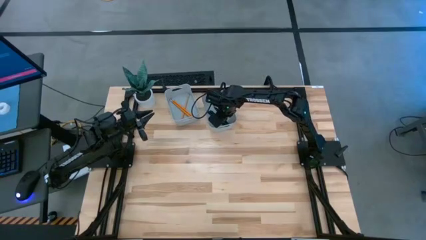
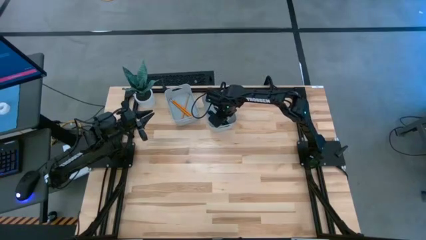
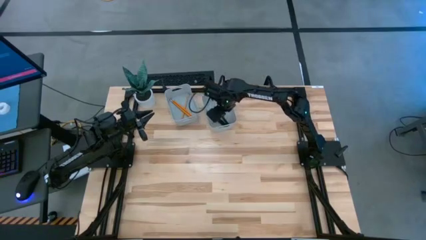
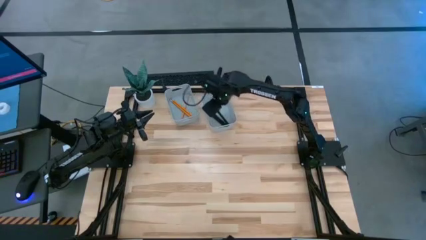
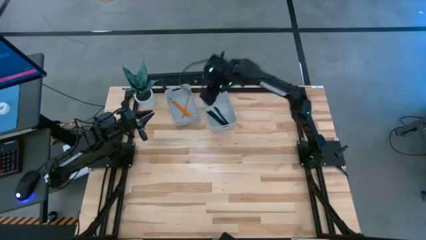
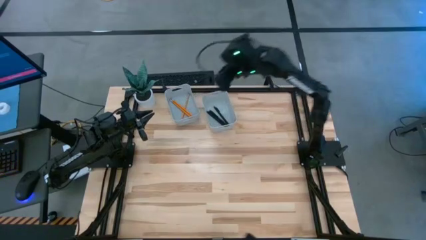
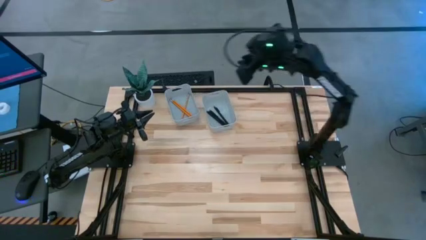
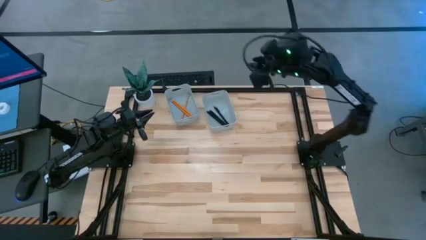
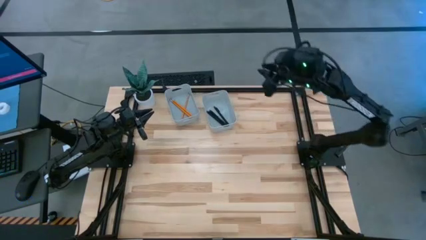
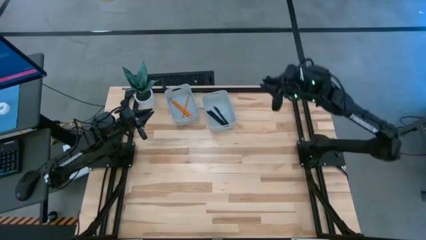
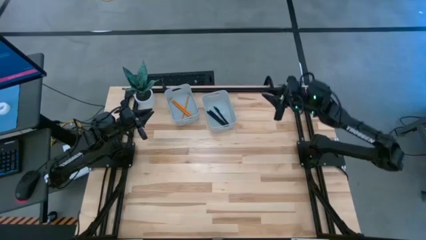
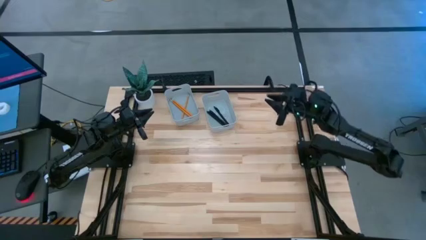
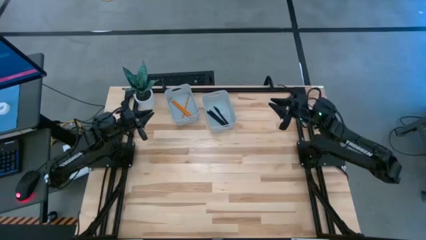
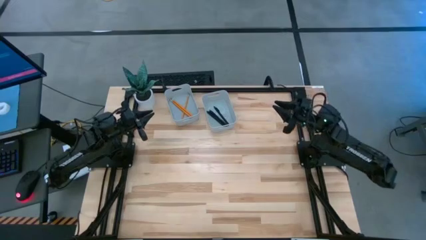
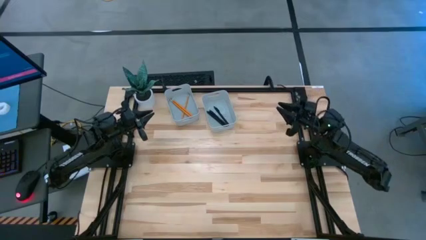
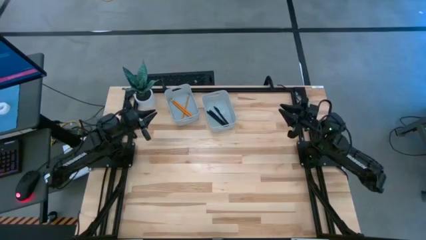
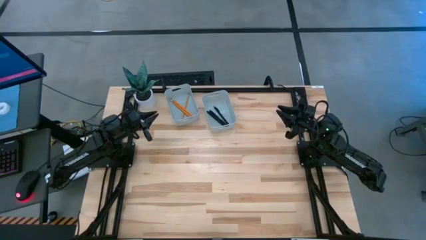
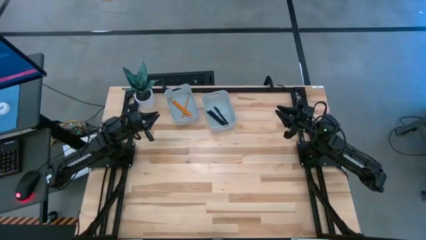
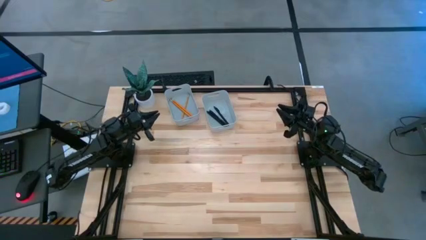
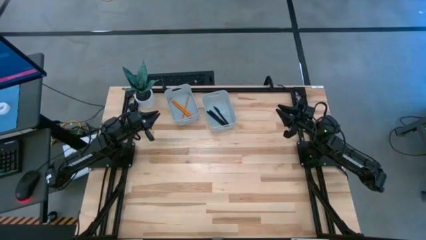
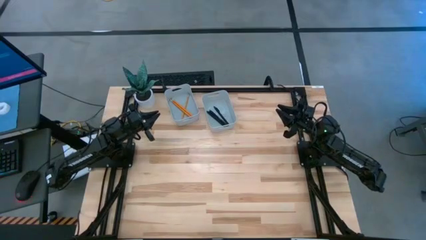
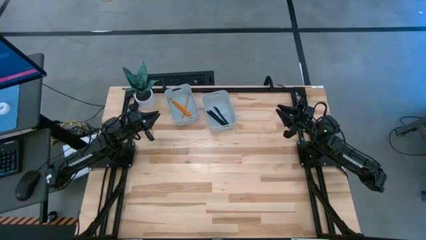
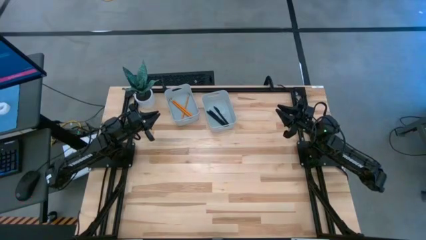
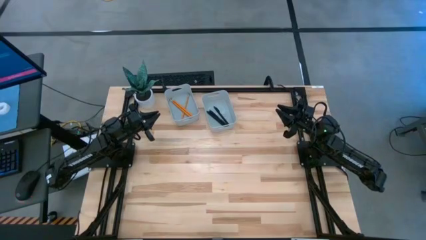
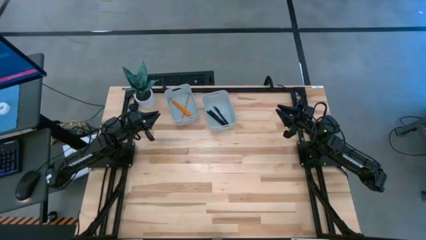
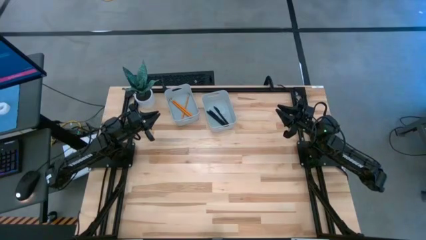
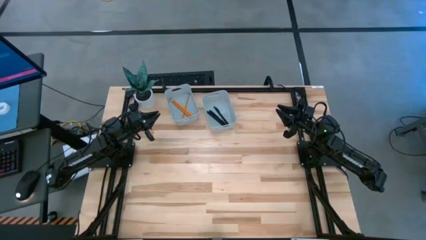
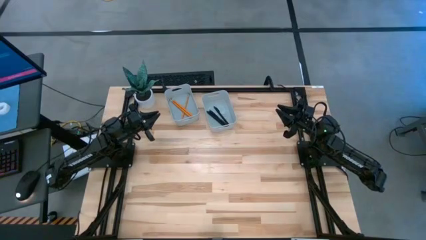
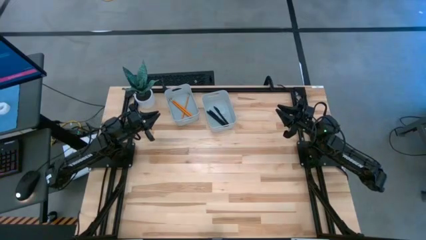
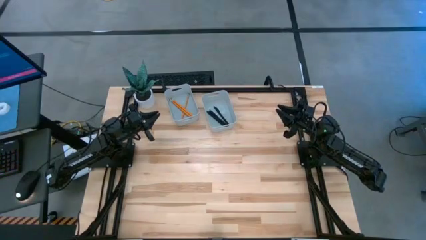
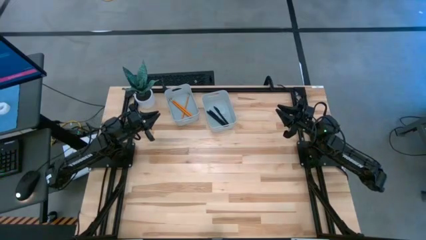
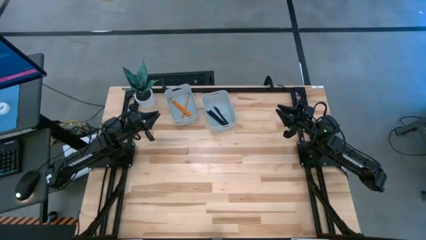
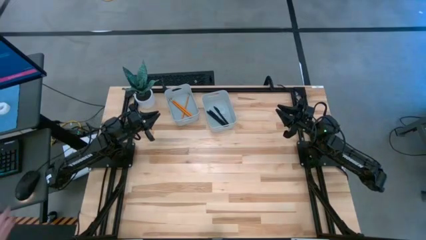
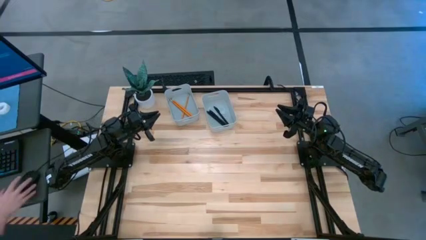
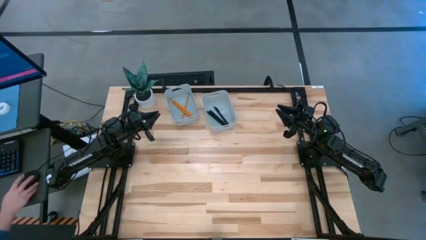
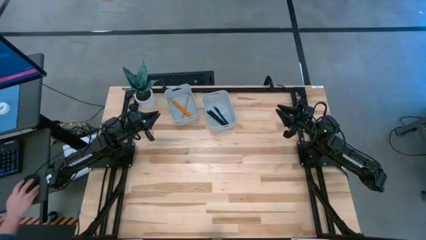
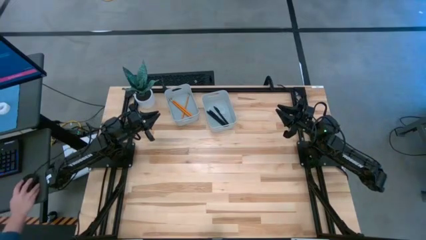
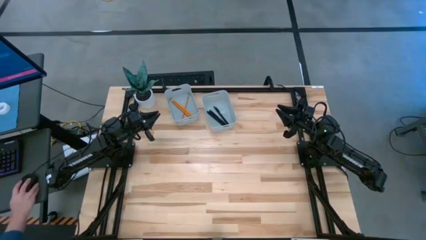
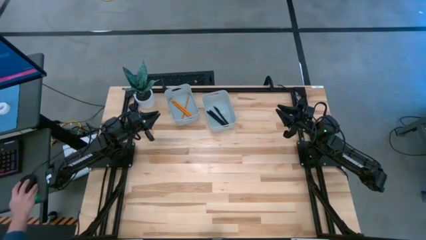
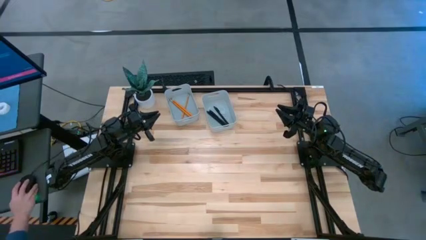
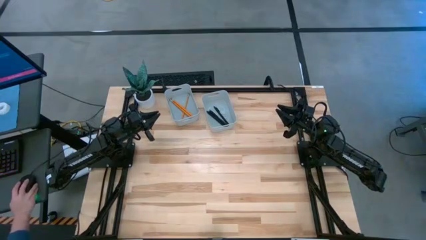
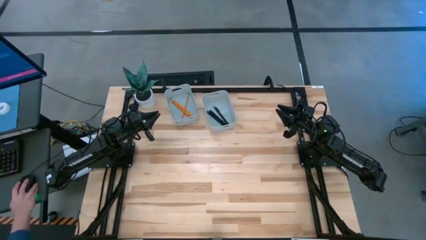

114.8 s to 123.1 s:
Task: Sort pens & pencils
Return to Home Position

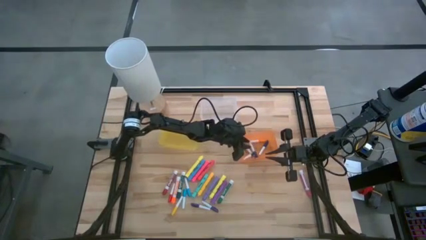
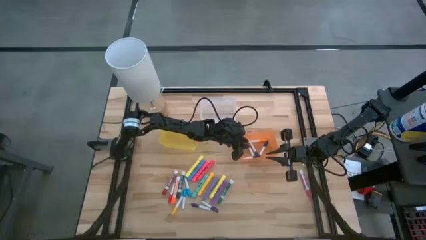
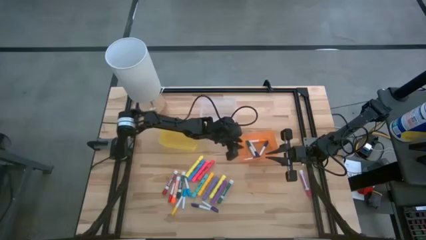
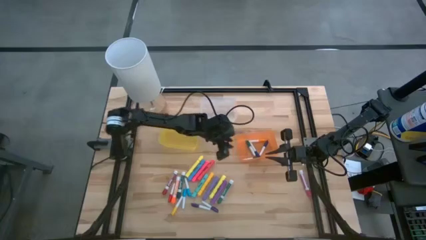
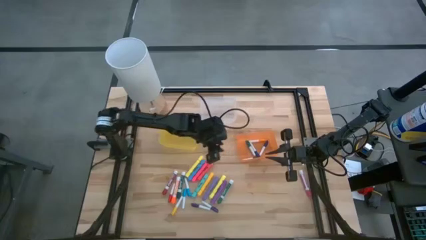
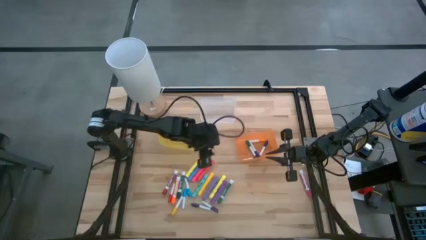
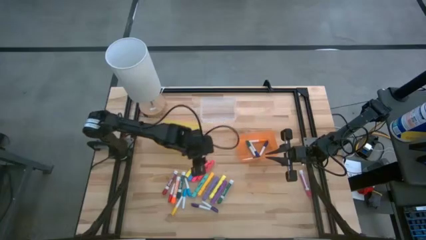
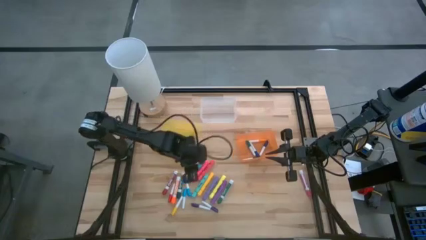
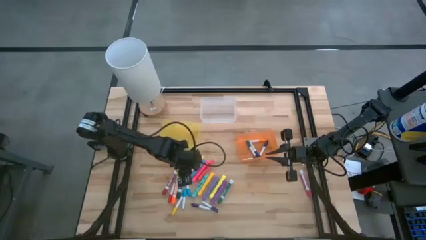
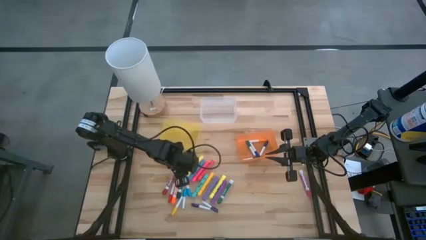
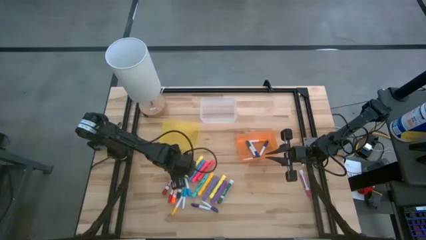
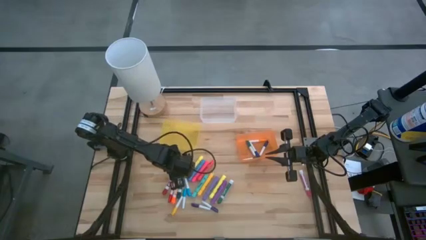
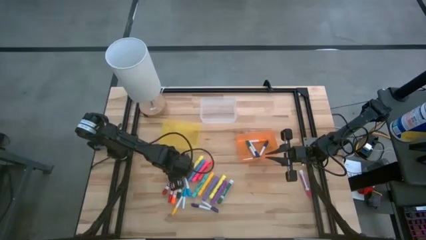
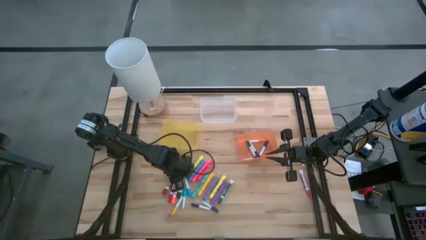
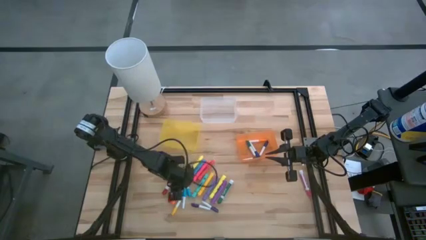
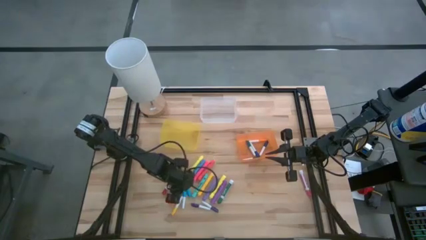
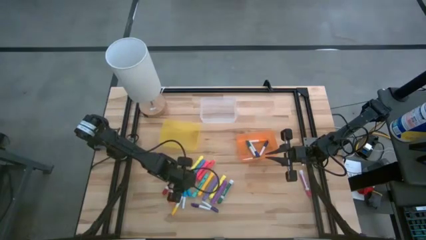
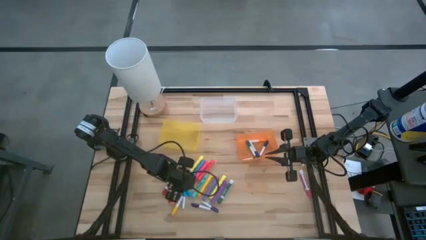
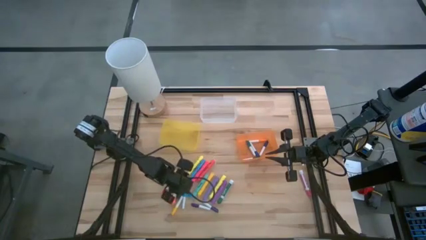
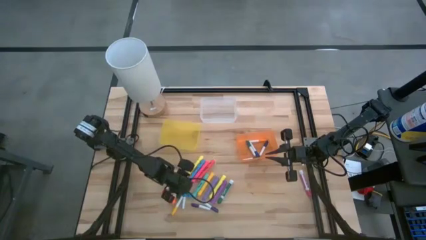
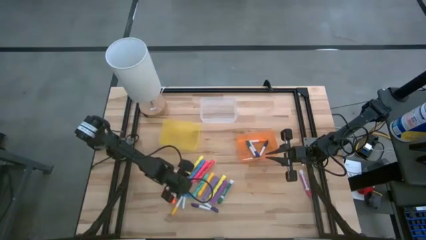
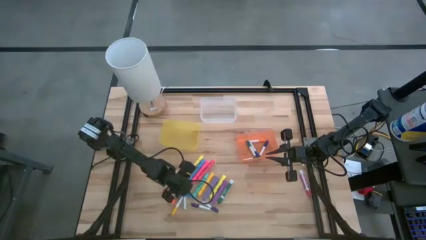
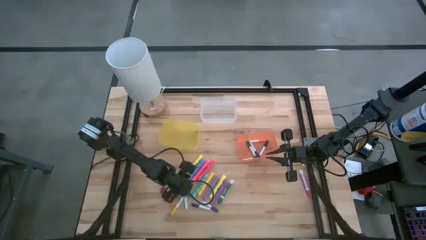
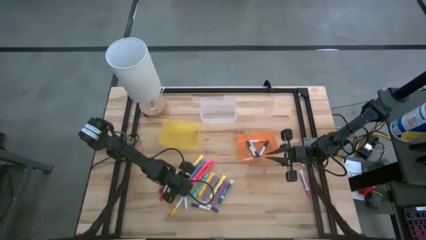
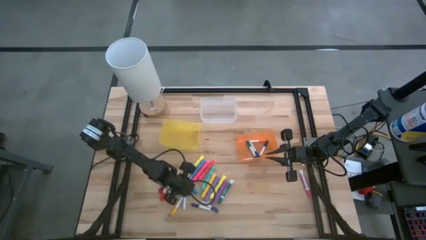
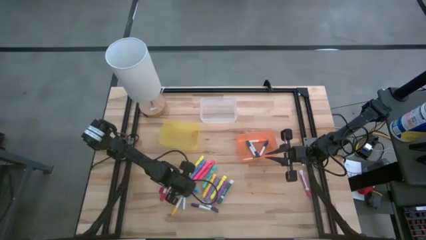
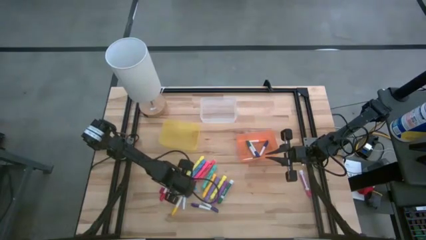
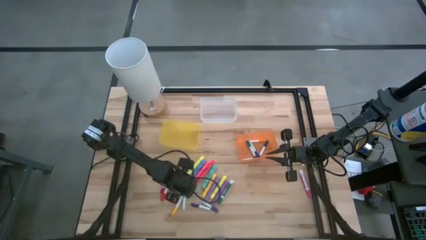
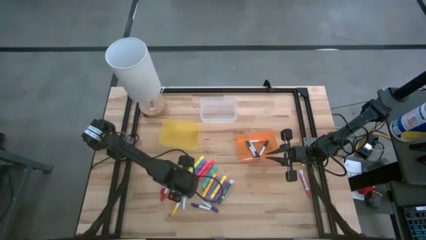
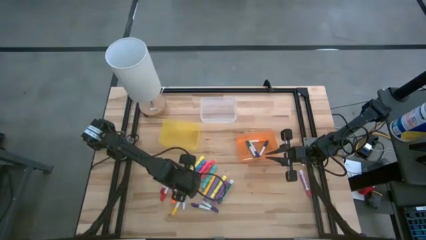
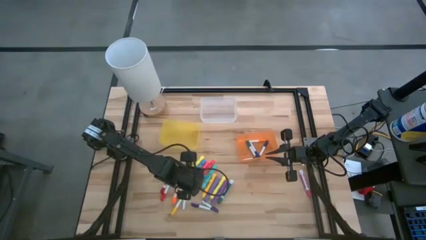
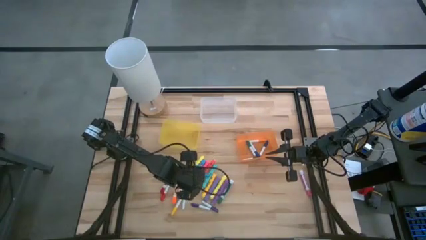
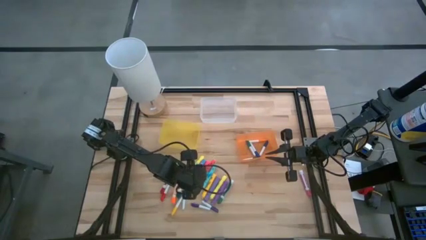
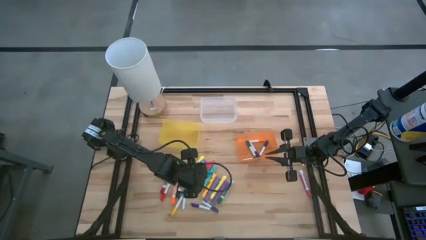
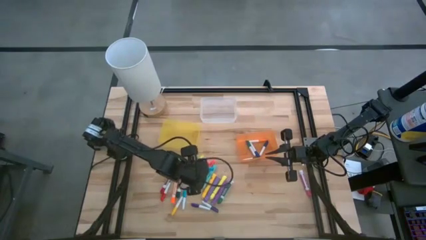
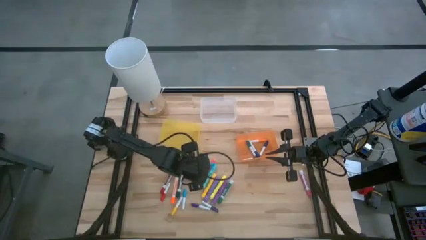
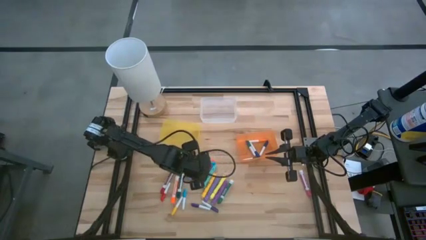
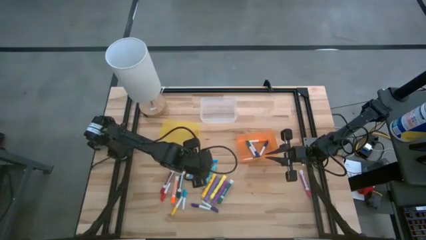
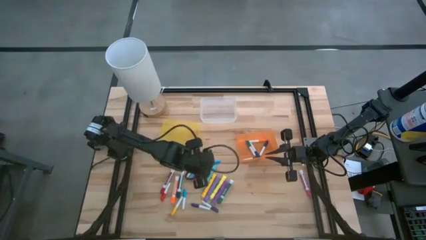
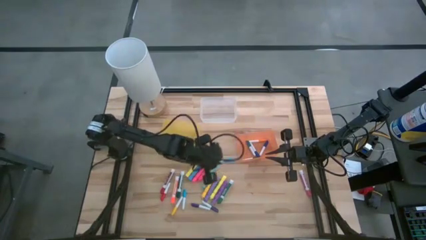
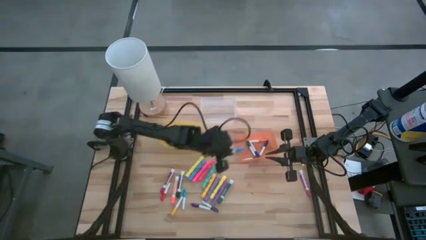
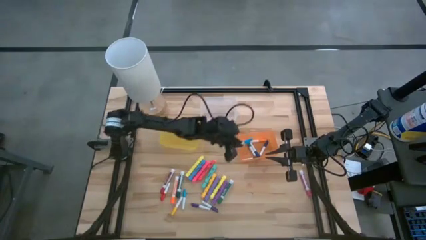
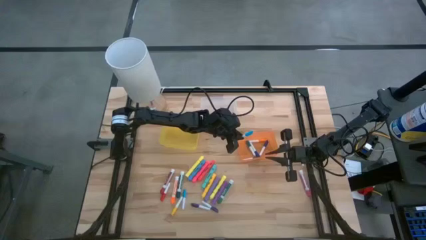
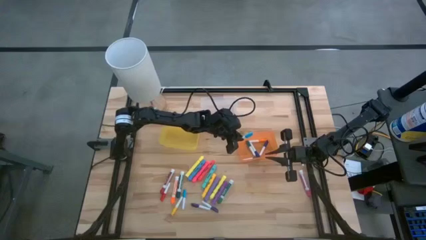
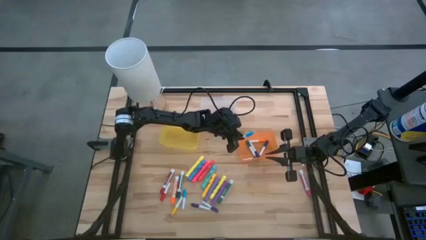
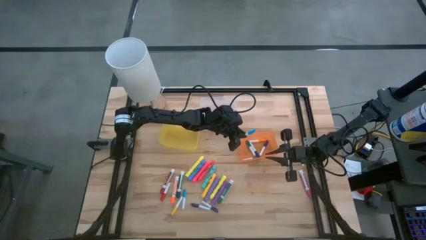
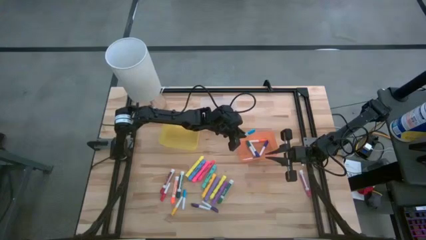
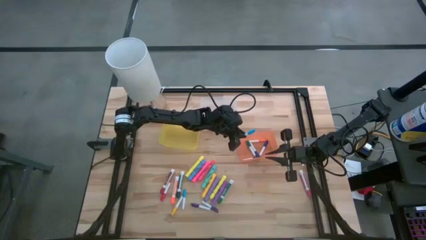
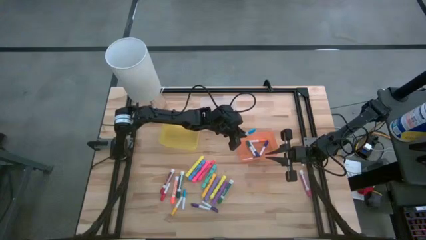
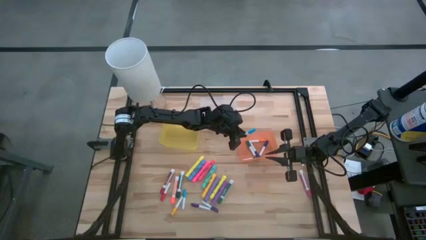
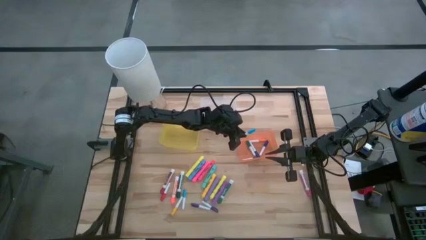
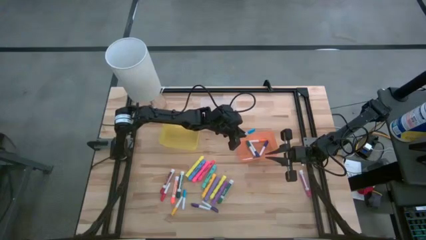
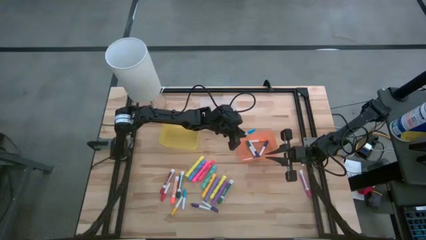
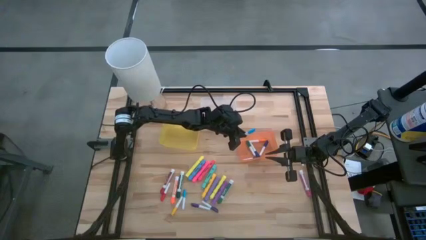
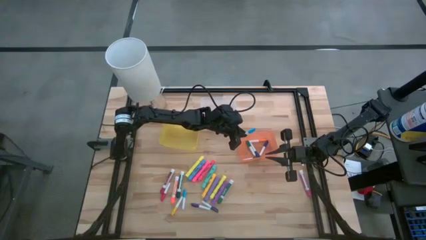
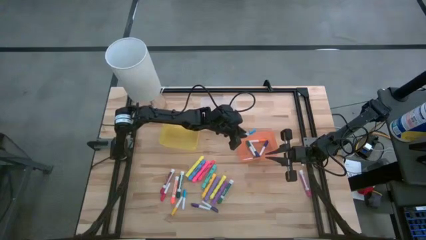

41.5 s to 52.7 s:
Task: Pick & Place Markers
Put the top small light blue highlighter pen into the orange bin
